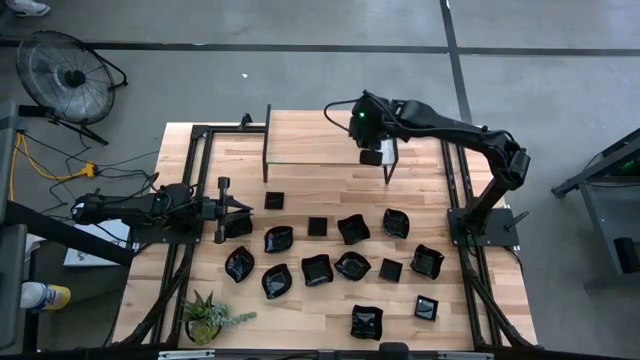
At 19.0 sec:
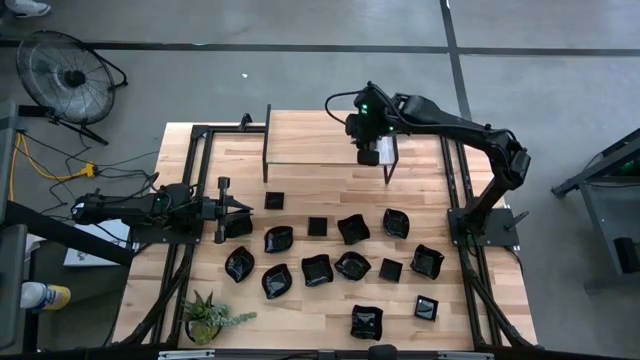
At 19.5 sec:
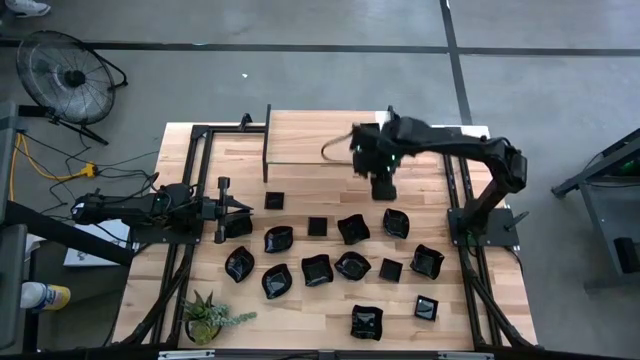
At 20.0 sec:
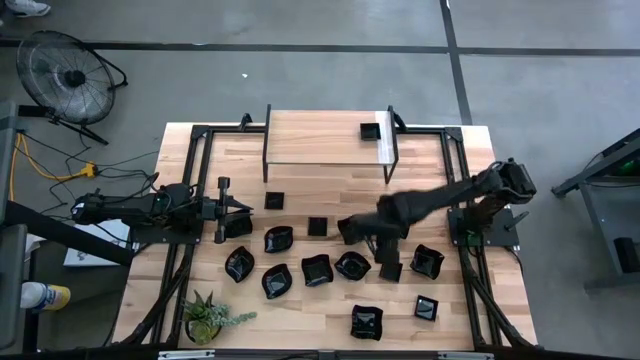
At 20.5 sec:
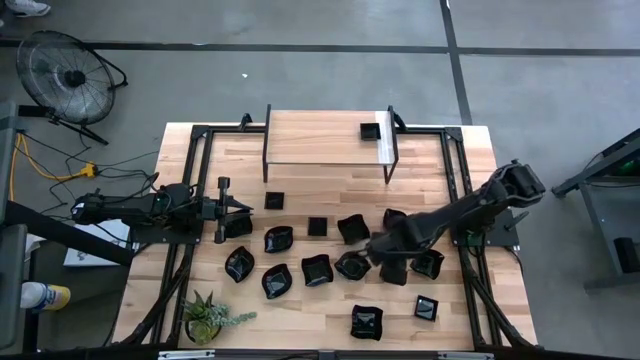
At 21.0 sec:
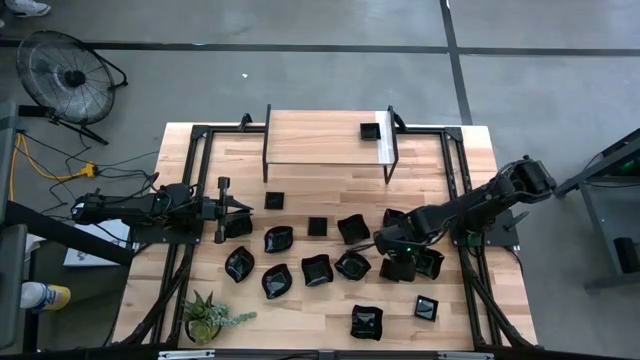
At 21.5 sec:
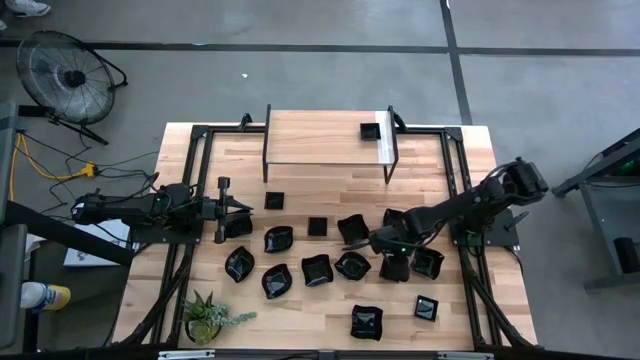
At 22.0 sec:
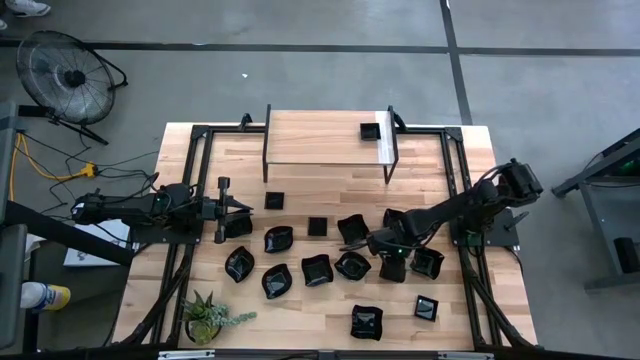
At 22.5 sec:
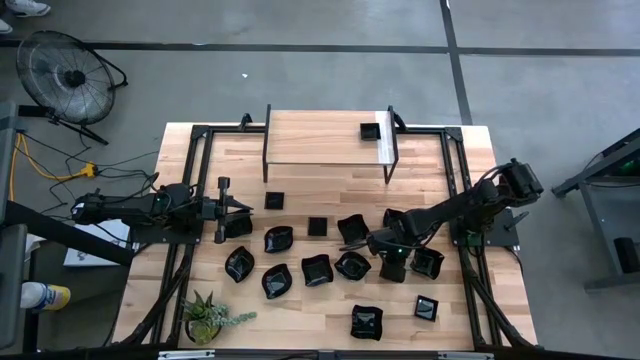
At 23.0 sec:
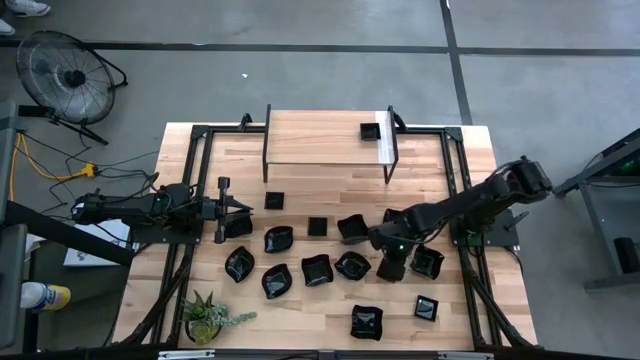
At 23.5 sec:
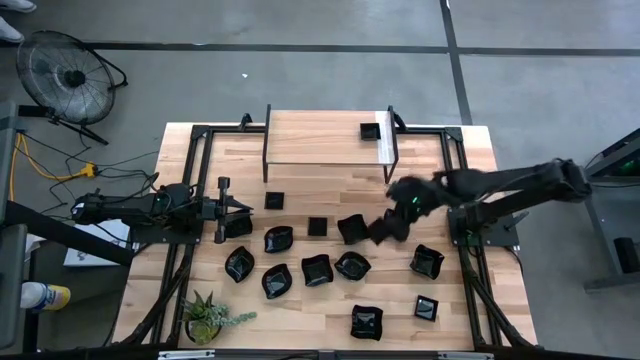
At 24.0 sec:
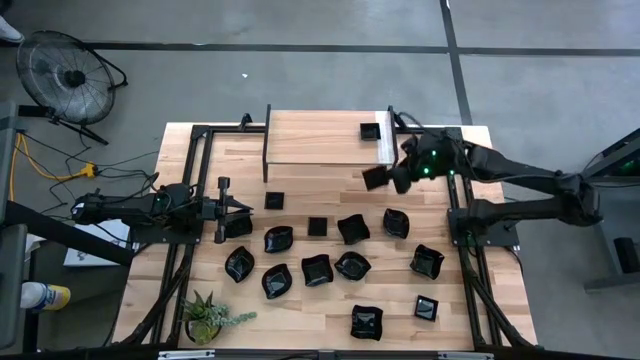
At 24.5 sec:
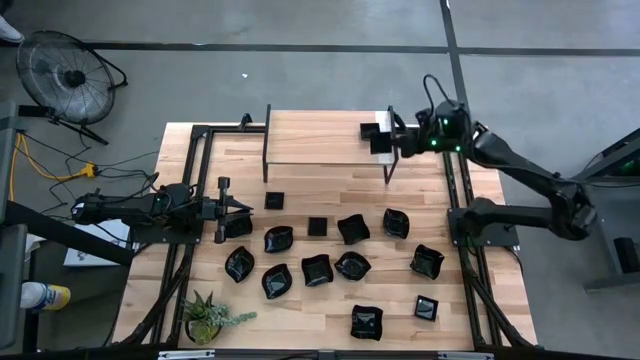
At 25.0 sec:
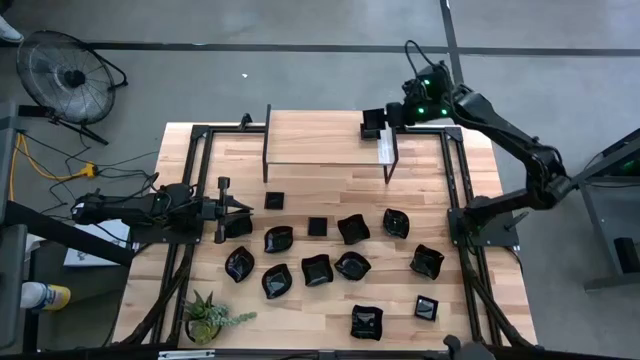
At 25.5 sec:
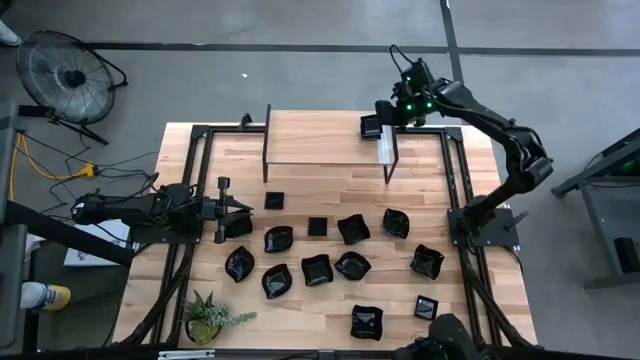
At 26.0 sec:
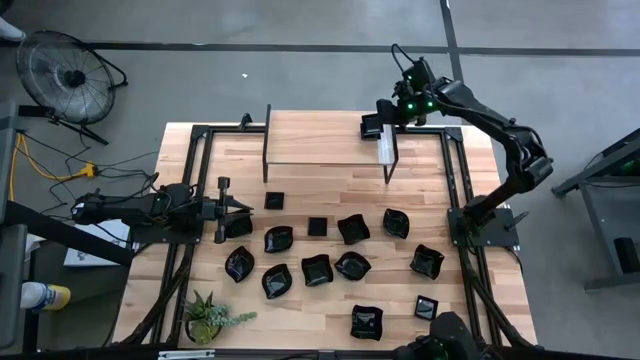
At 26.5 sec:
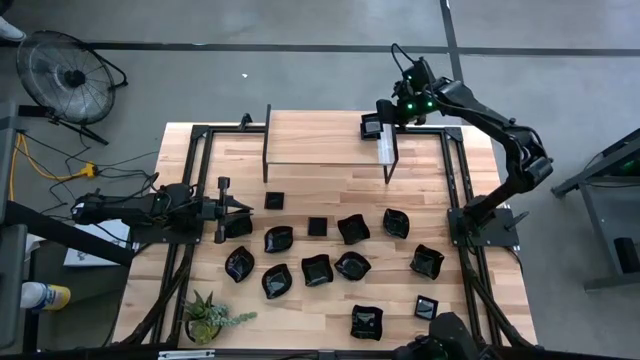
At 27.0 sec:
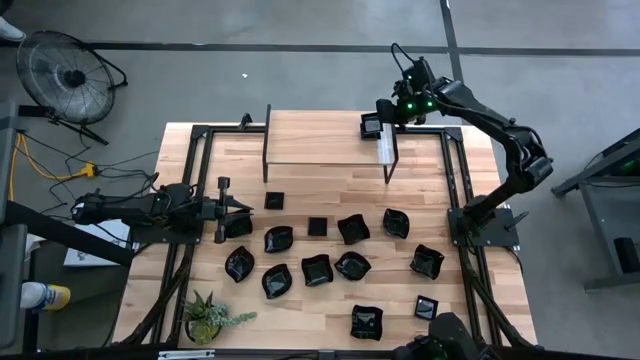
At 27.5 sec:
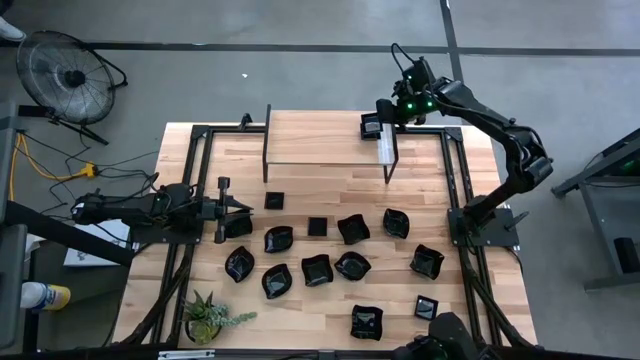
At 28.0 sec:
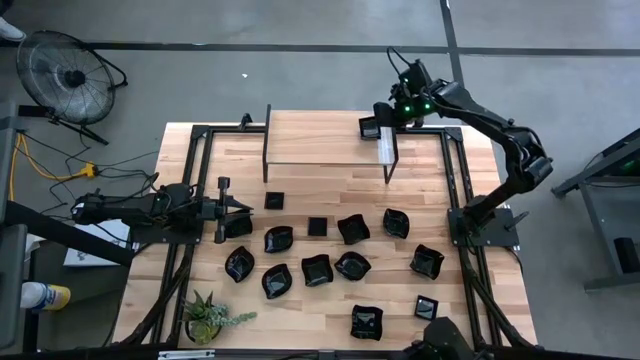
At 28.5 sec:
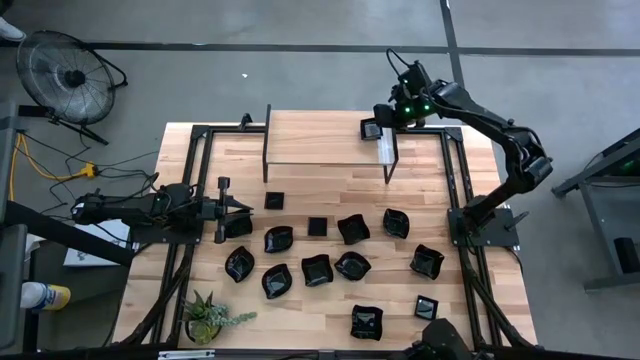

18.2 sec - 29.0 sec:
Task: Pick & Place Mini shaped plates
Stack the black square plate on top of the black square plate on the shelf

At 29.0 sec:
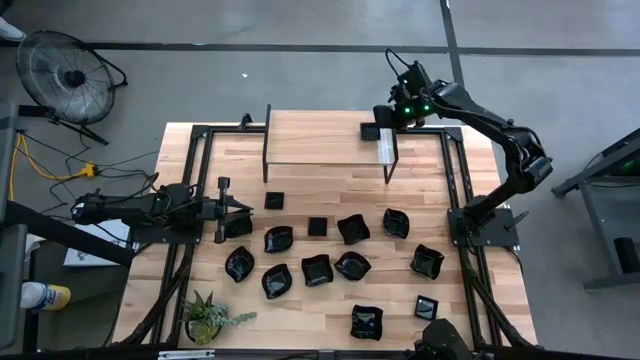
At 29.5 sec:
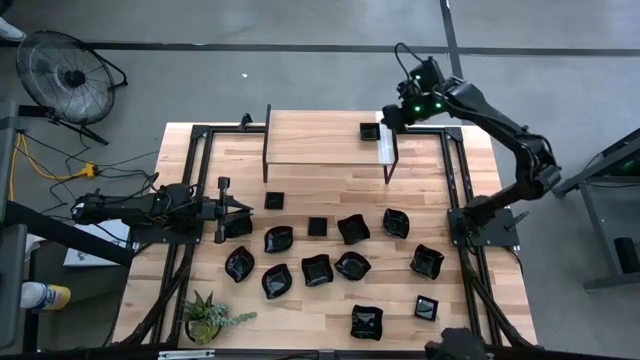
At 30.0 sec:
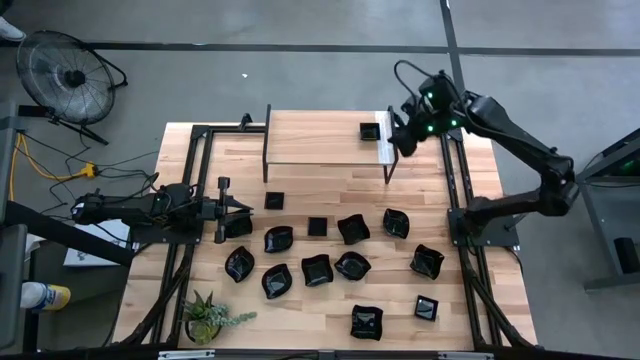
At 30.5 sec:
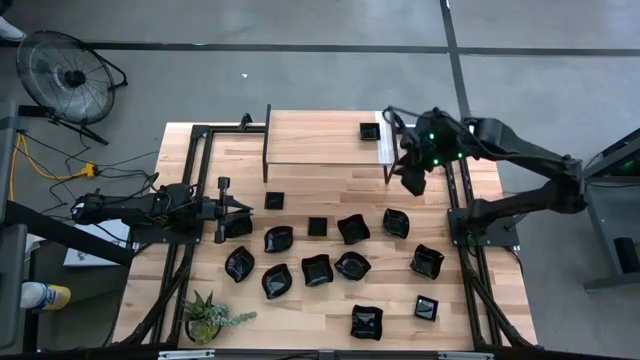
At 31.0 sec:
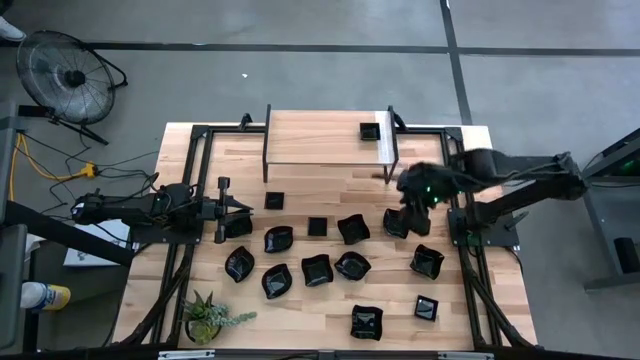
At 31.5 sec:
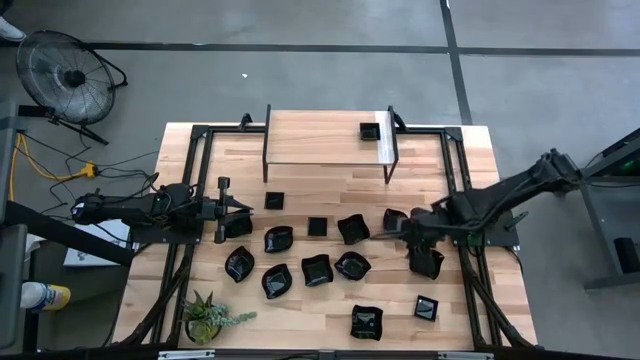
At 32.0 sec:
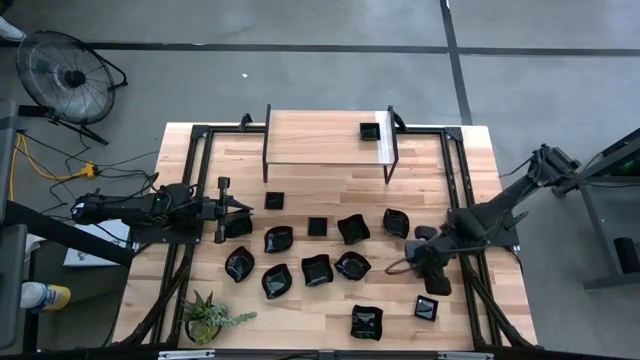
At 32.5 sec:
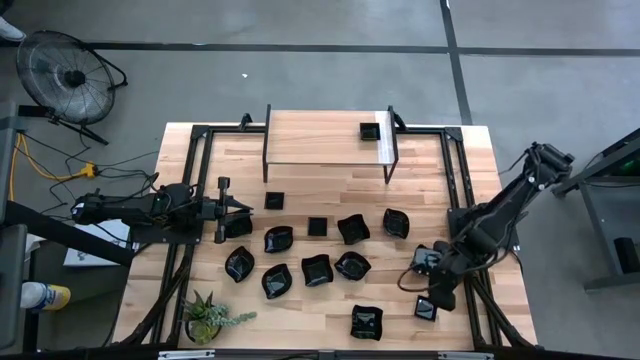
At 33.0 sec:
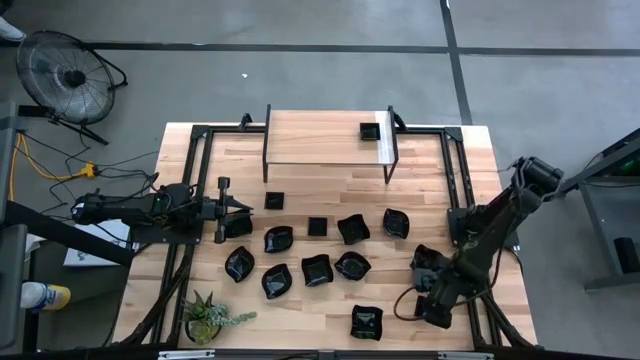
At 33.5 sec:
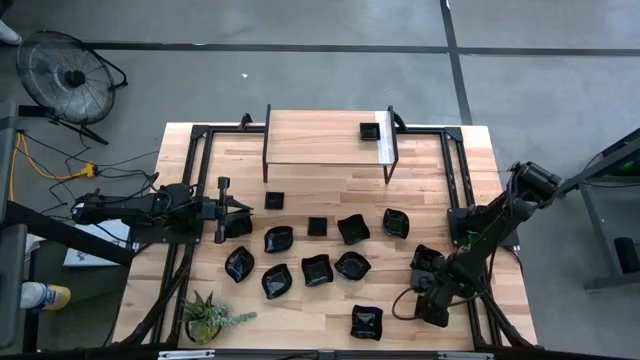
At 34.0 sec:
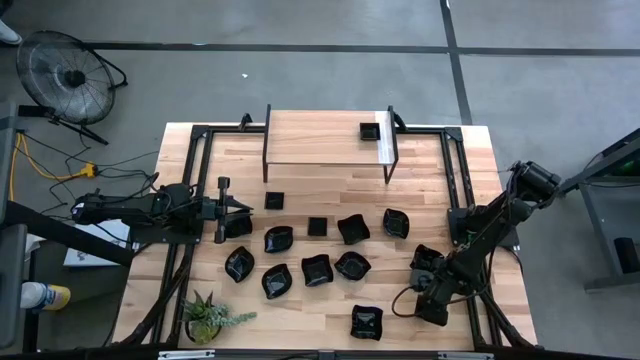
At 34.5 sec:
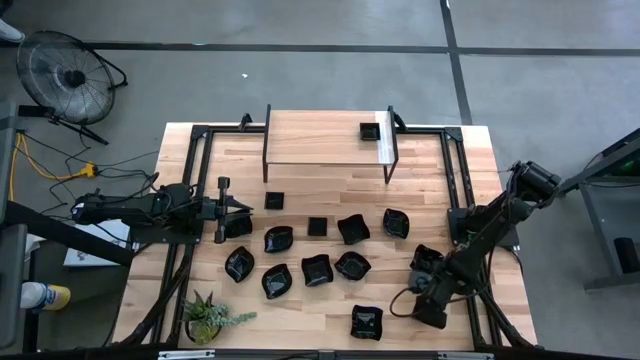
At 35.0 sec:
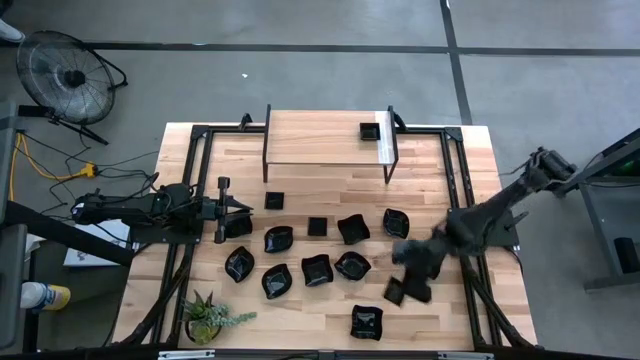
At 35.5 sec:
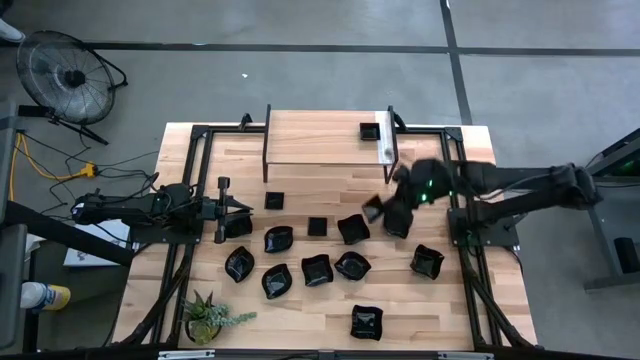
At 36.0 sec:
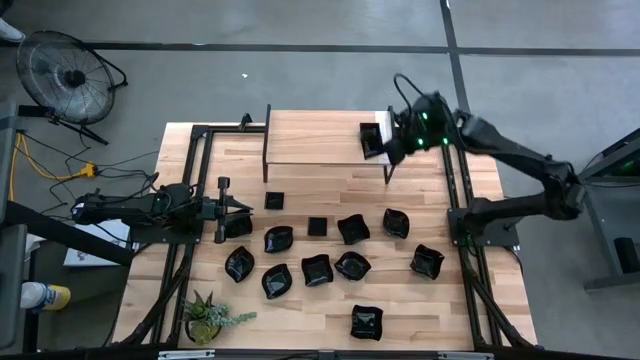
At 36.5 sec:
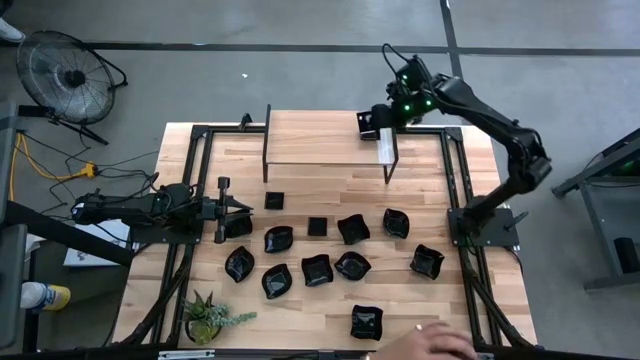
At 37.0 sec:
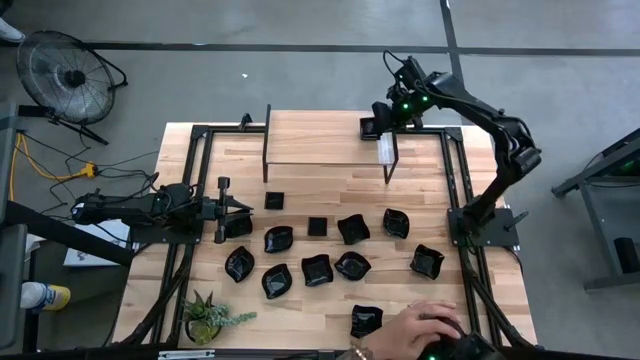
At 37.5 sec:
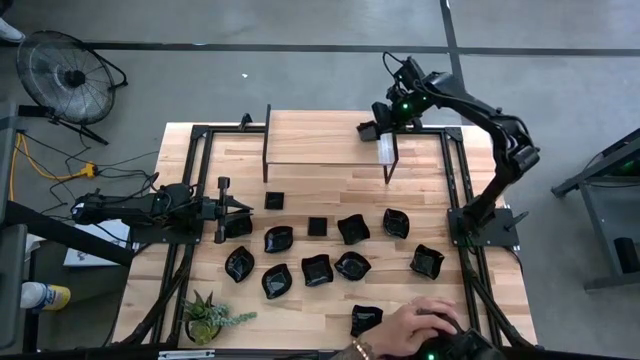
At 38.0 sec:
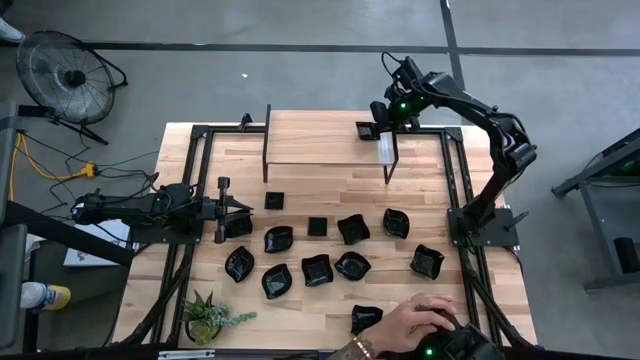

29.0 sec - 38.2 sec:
Stack the black square plate on top of the black square plate on the shelf
